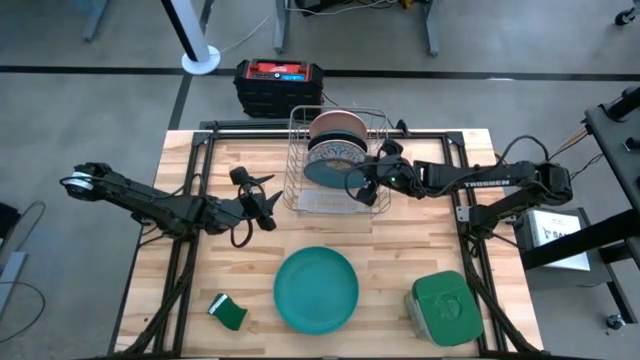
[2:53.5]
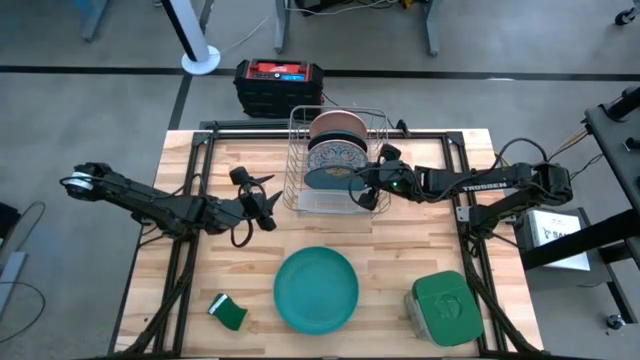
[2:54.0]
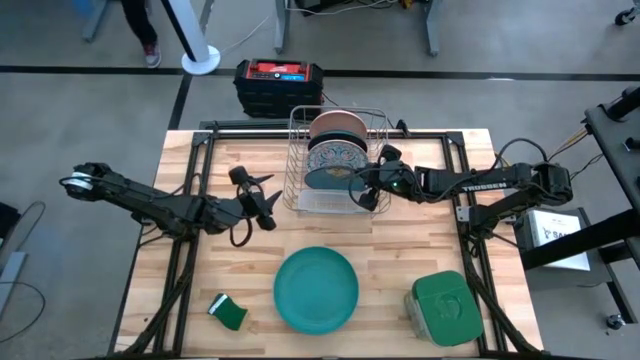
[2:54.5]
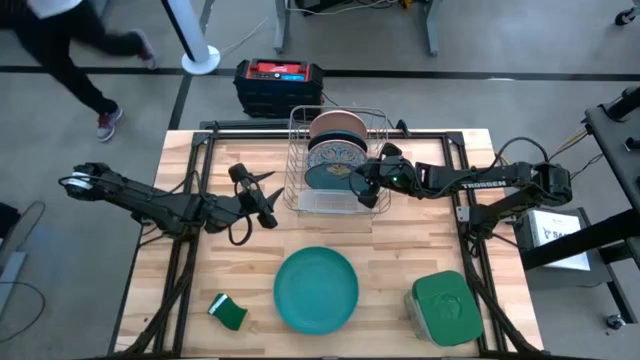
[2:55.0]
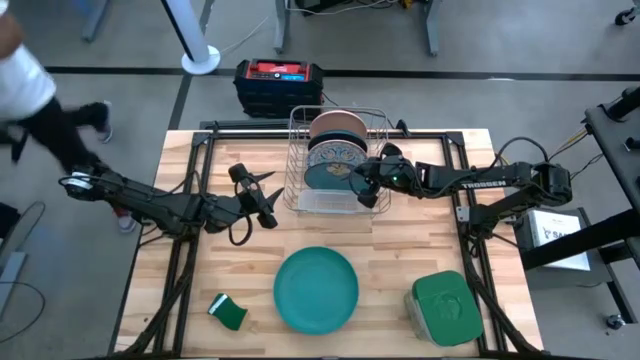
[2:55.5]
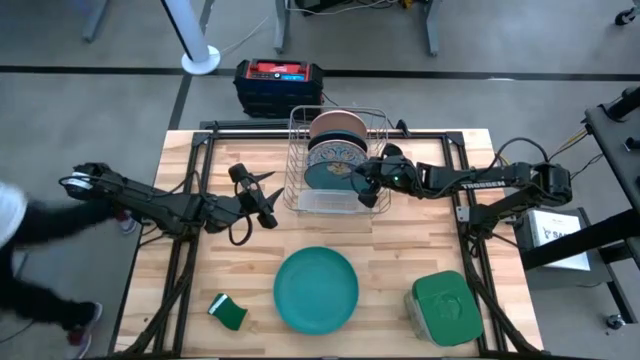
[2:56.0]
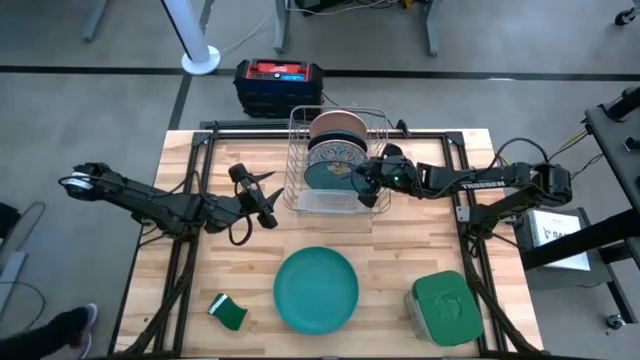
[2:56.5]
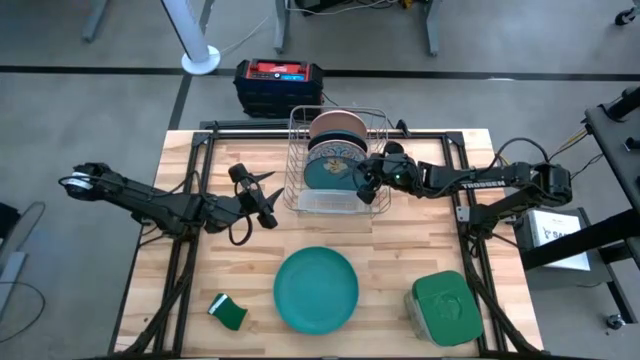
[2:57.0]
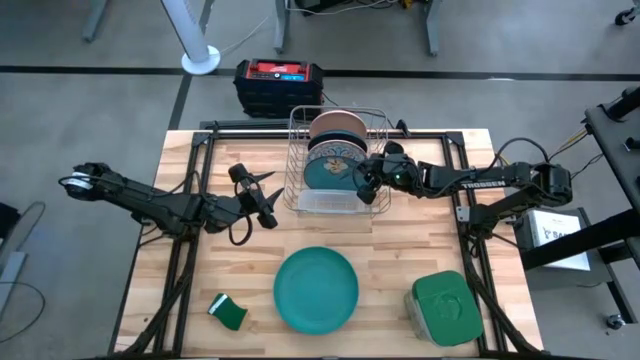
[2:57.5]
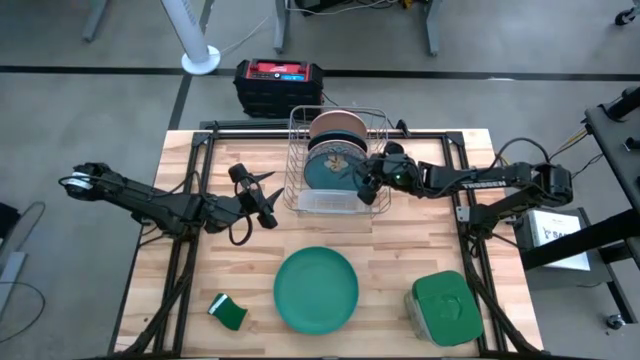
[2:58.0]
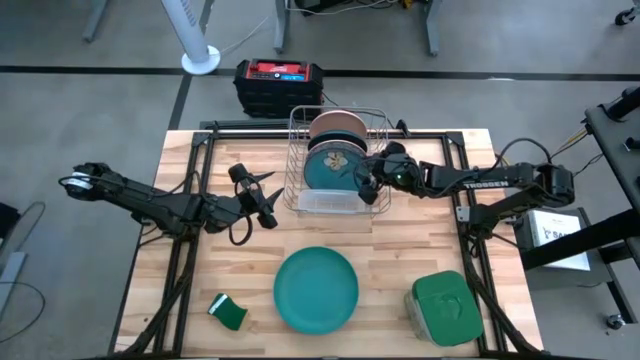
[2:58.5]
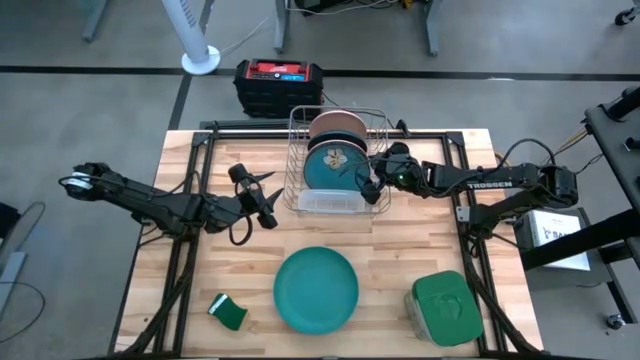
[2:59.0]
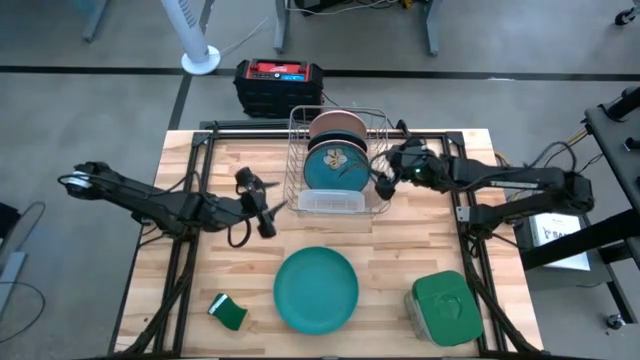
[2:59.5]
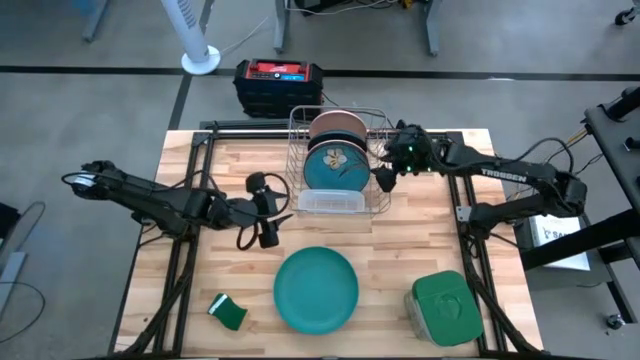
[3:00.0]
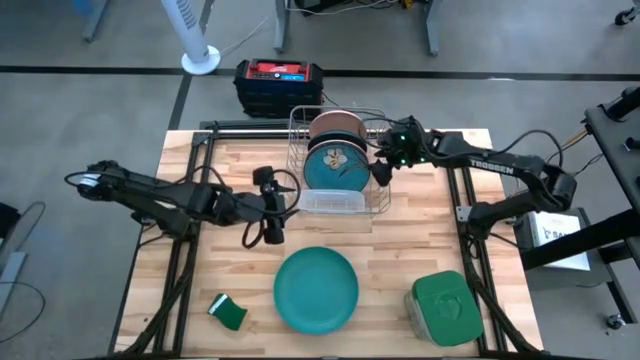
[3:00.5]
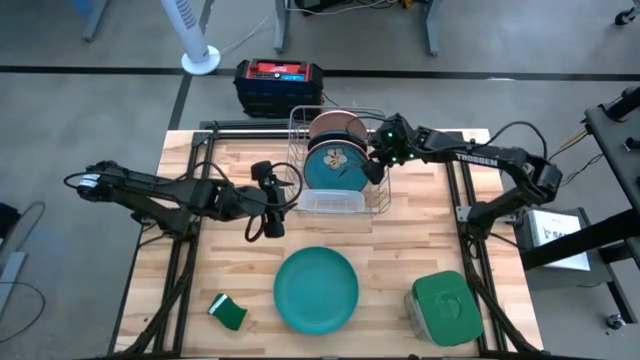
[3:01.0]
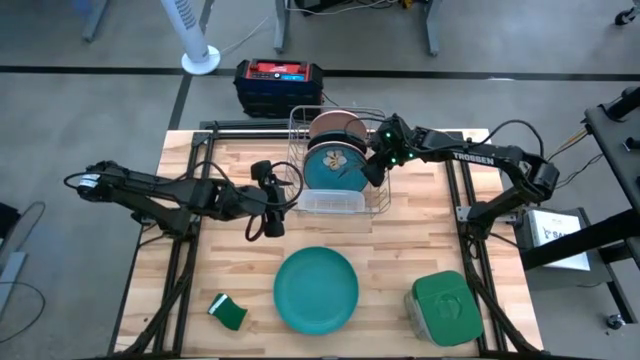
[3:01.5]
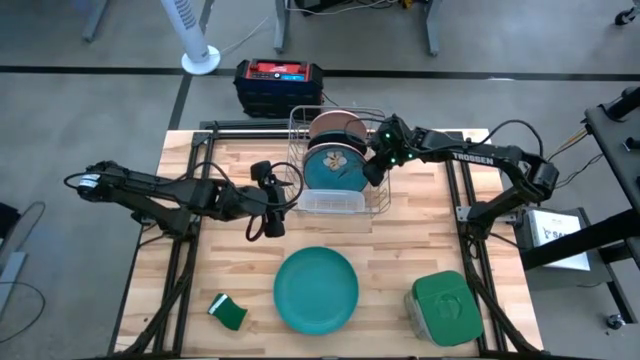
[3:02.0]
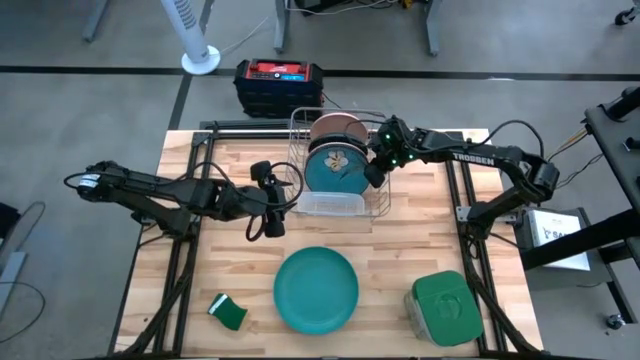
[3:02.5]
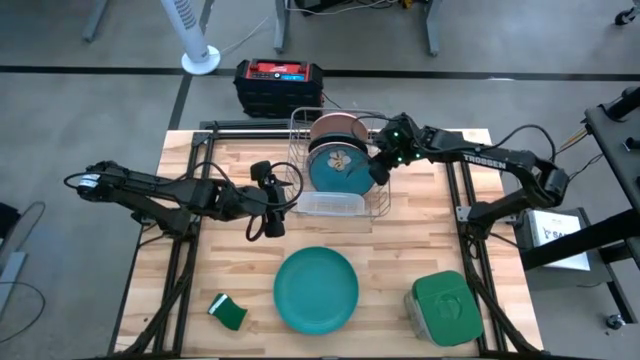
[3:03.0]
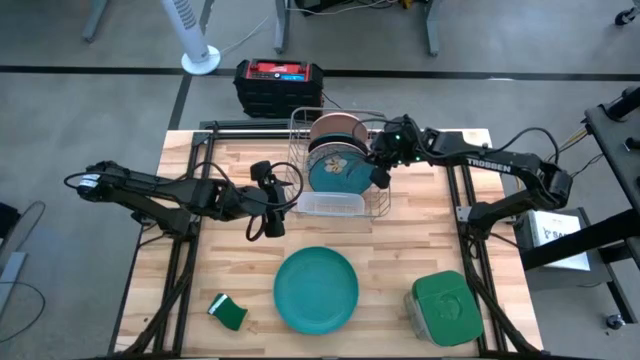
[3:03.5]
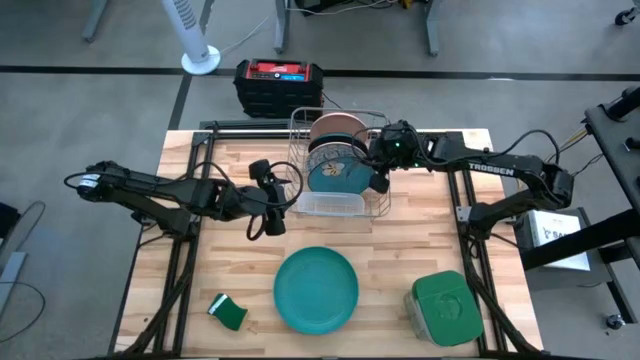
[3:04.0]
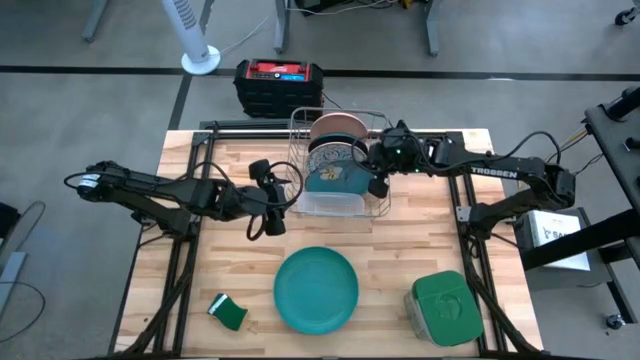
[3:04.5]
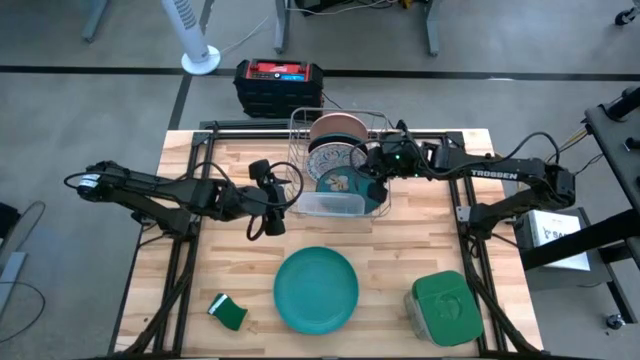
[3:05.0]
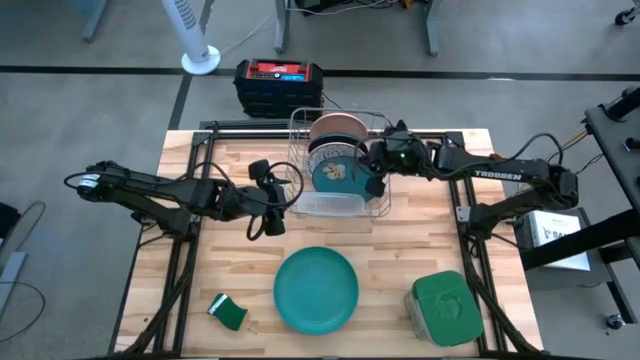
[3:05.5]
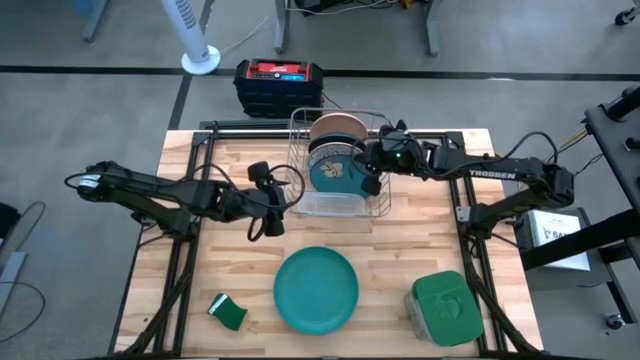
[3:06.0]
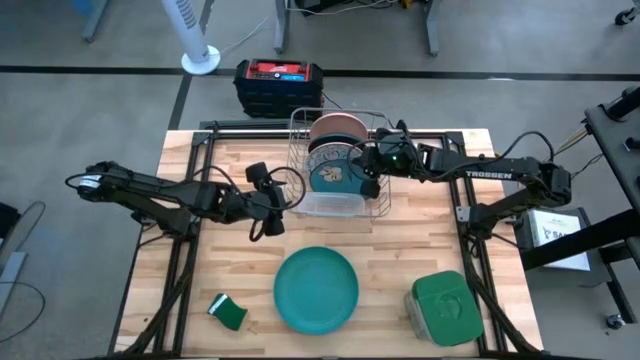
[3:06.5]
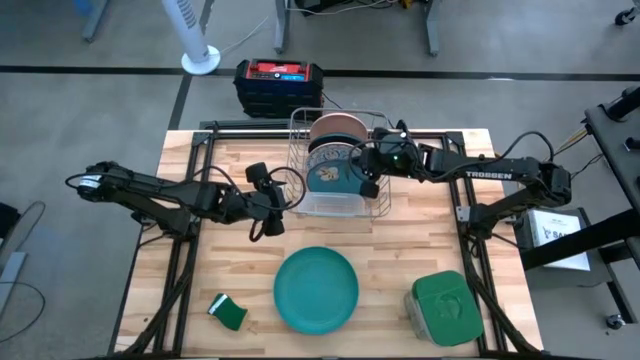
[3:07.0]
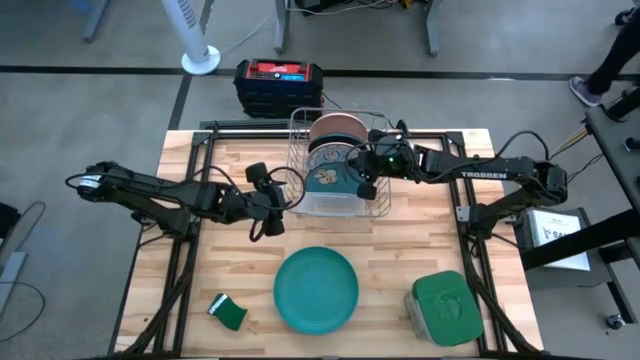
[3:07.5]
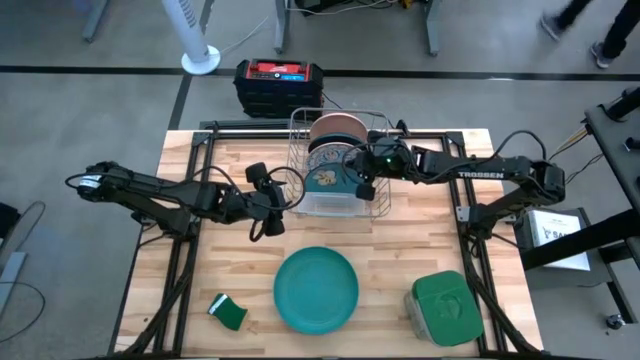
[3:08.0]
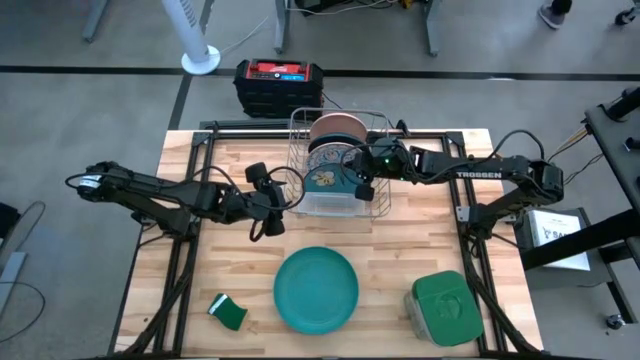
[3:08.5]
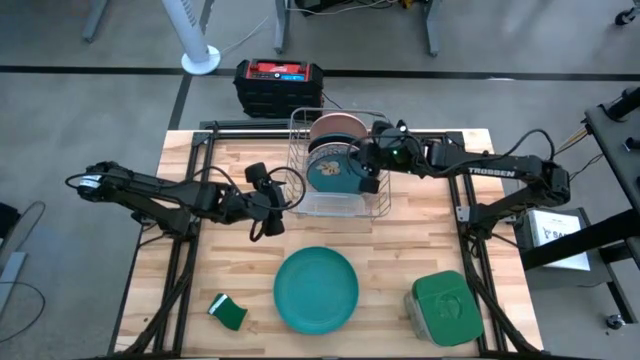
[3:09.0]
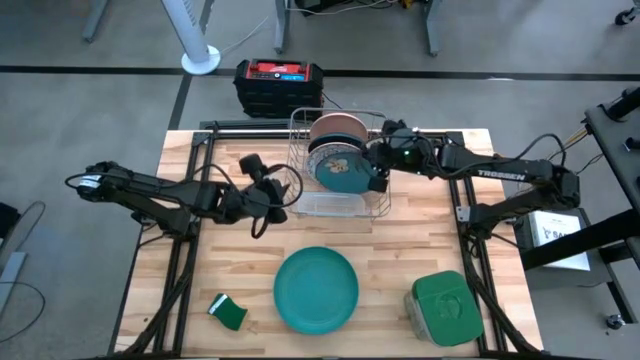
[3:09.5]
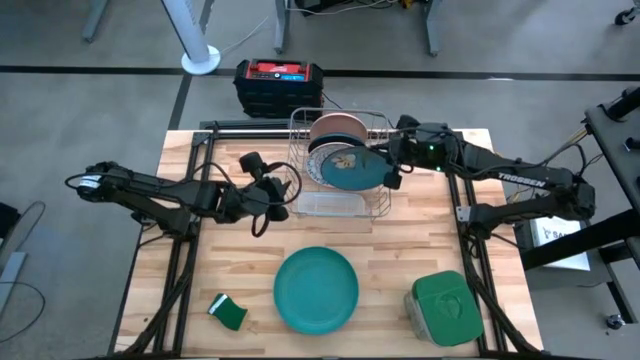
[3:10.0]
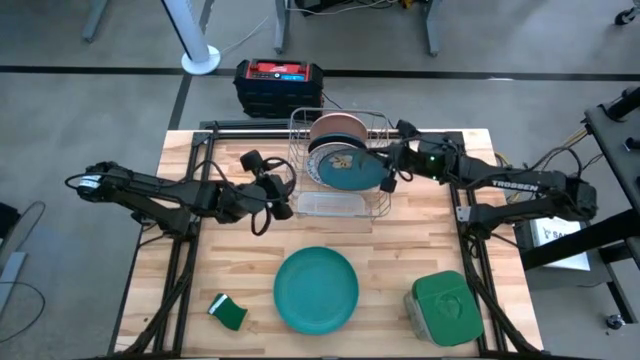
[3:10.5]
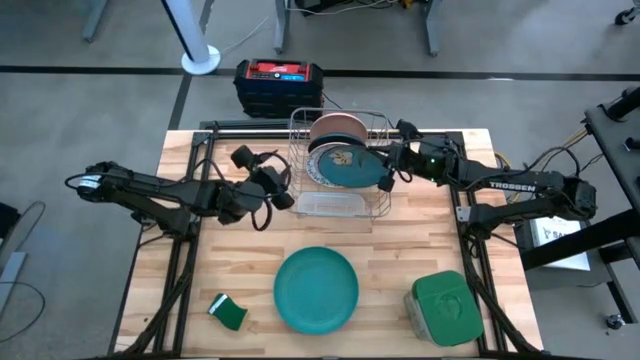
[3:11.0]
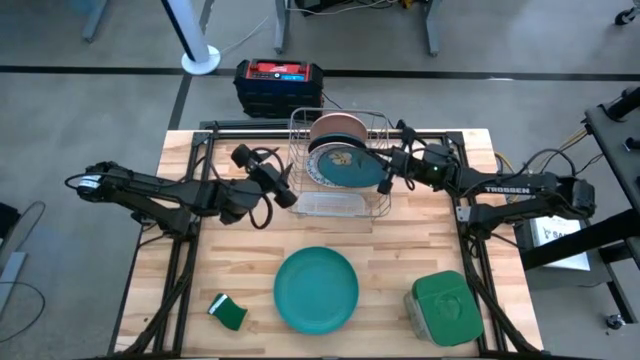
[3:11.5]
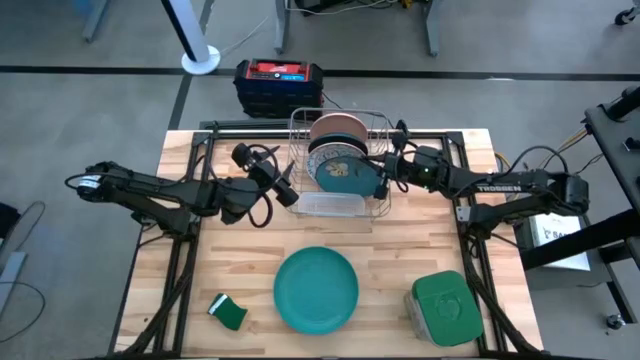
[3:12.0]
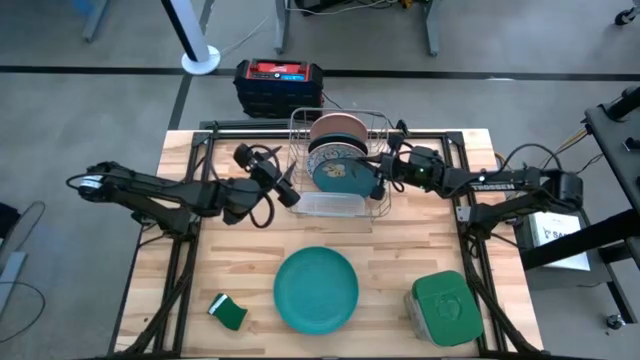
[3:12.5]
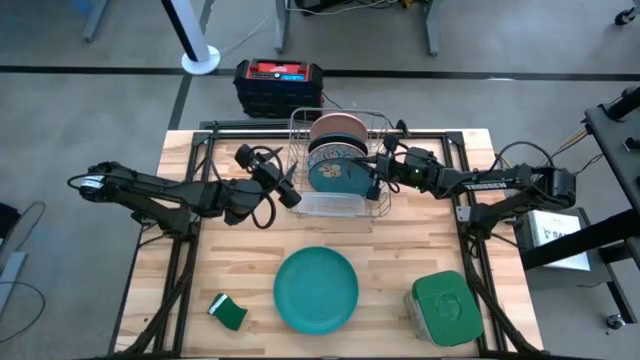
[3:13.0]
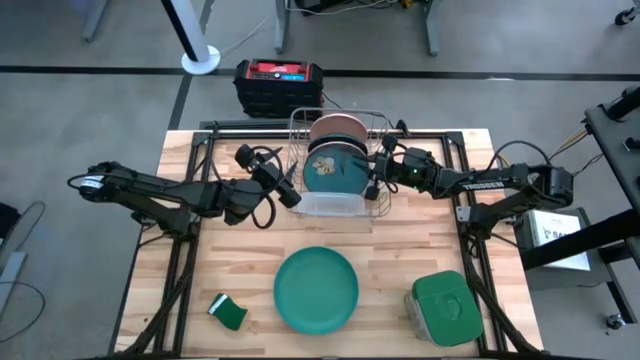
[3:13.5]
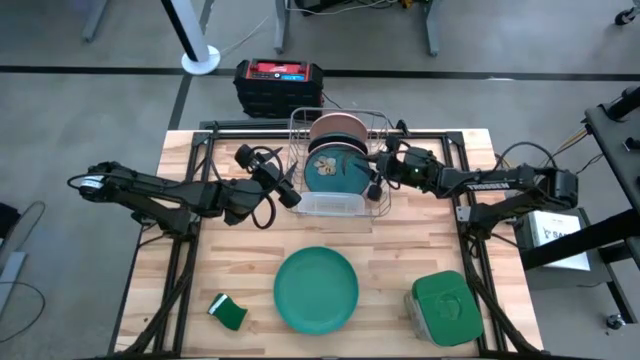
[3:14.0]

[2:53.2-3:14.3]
Task: Sort dishes
Put the blue plate in the dishwasher rack

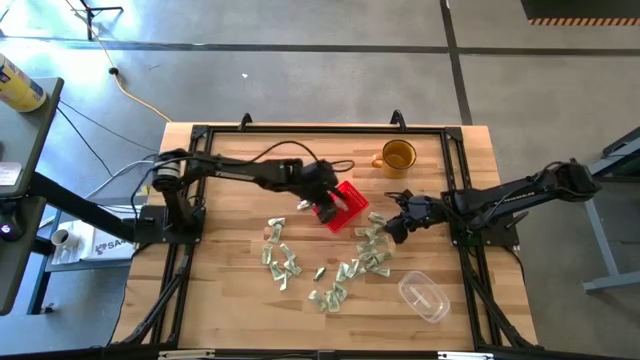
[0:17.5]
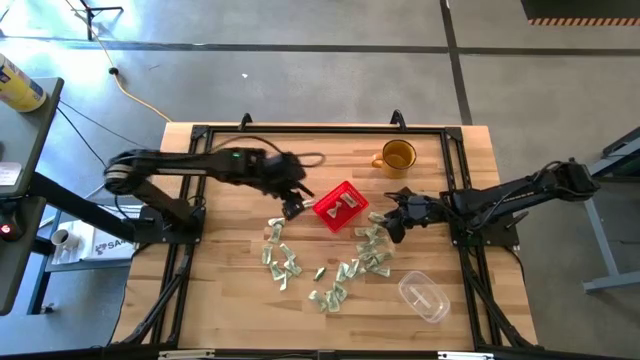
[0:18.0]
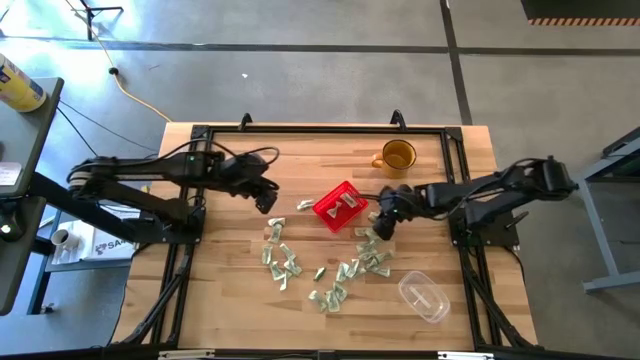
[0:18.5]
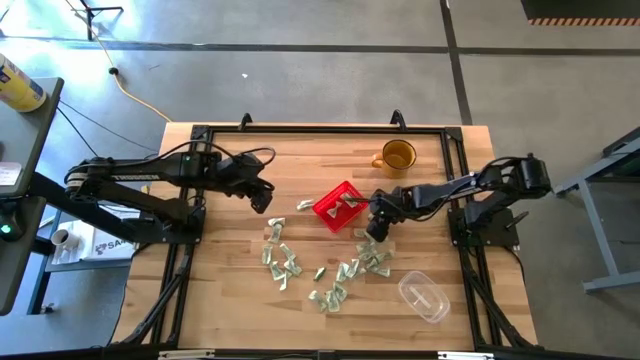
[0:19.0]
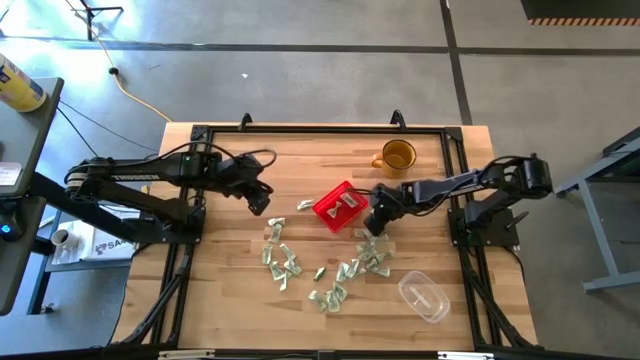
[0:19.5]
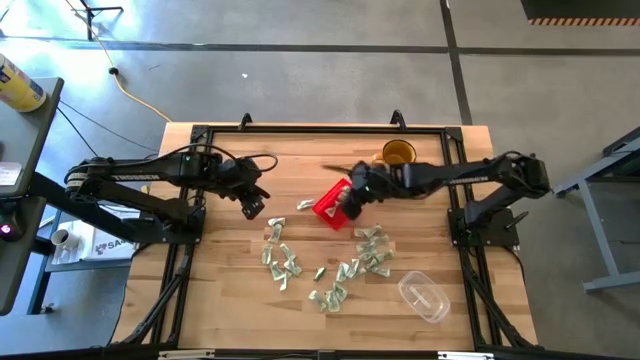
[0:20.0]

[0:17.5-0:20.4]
Task: Pick and place items into bin
Put the white stevia packet into the red bin
